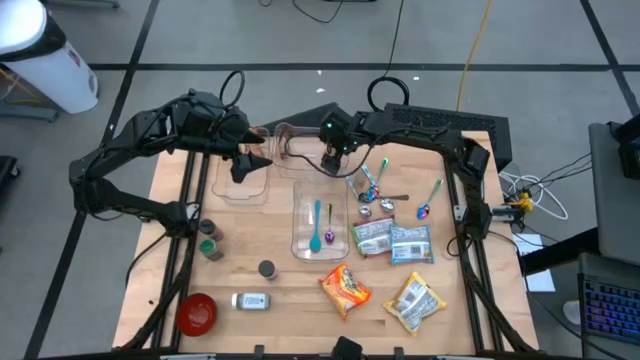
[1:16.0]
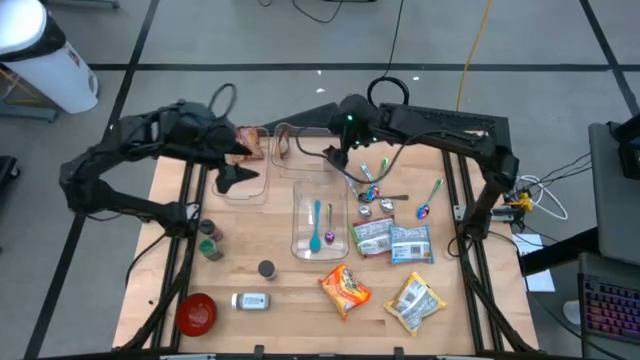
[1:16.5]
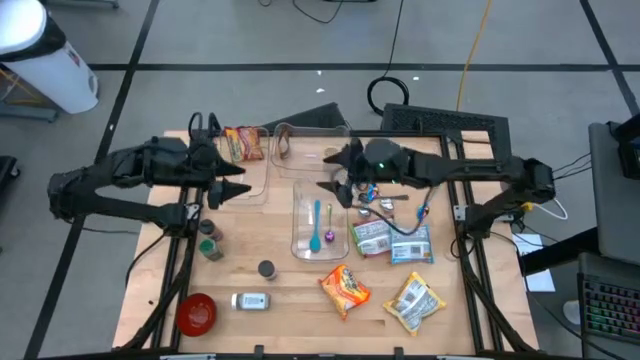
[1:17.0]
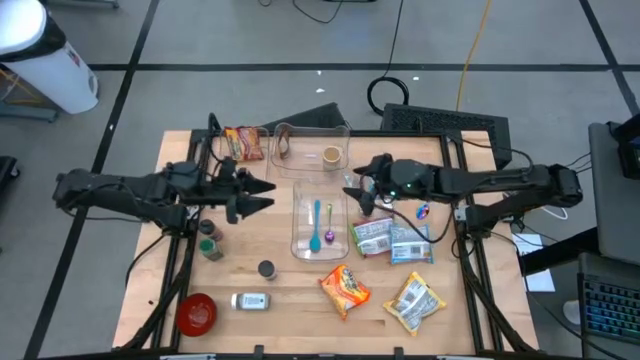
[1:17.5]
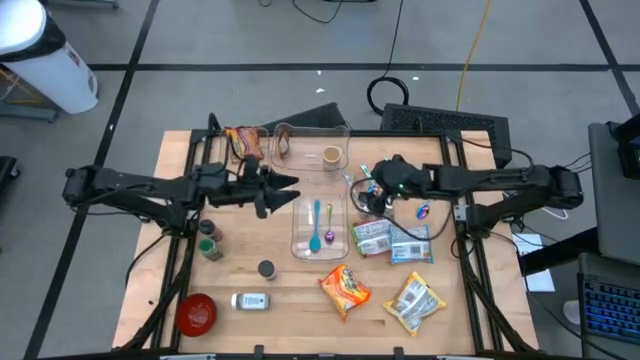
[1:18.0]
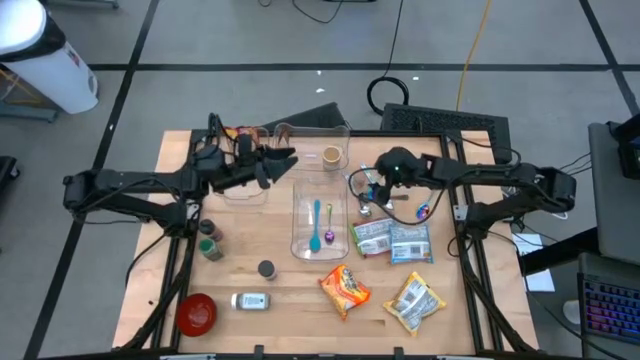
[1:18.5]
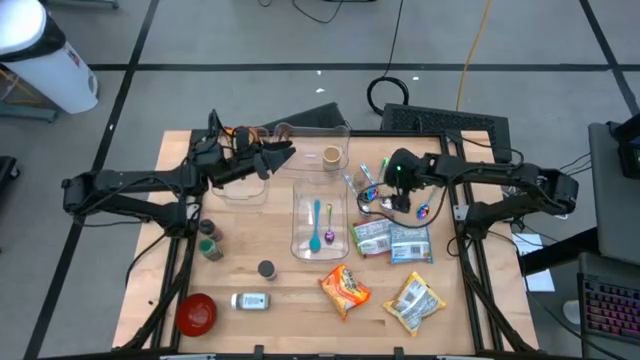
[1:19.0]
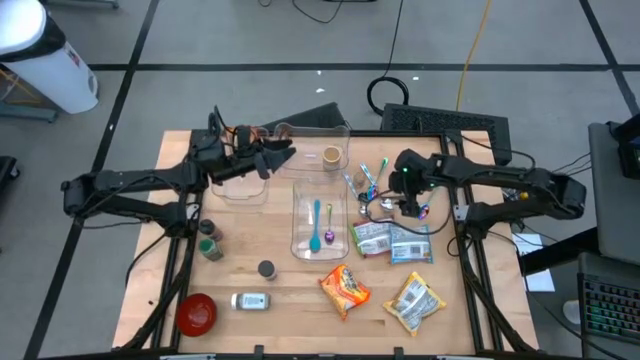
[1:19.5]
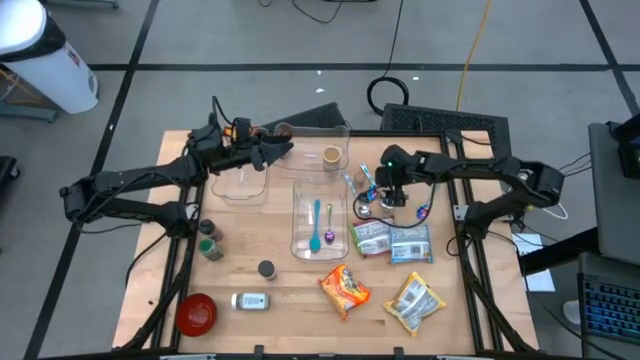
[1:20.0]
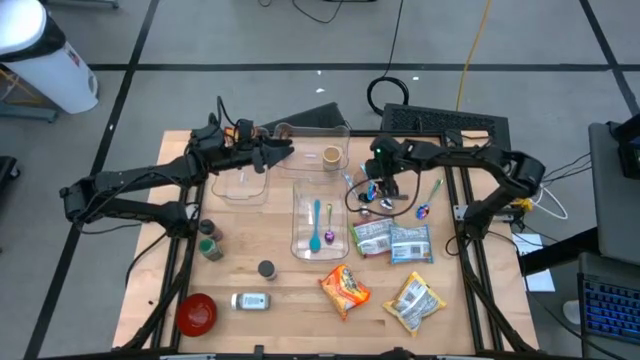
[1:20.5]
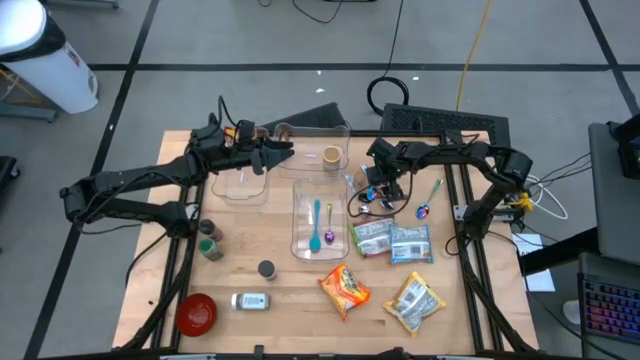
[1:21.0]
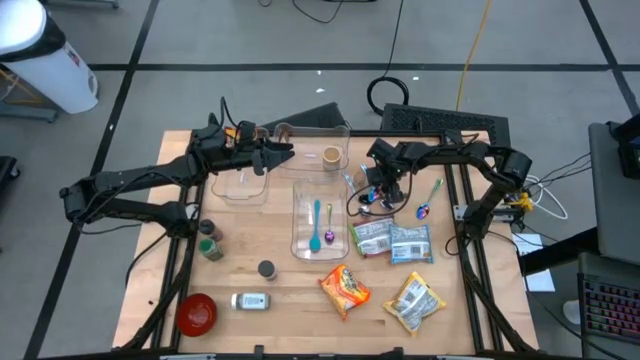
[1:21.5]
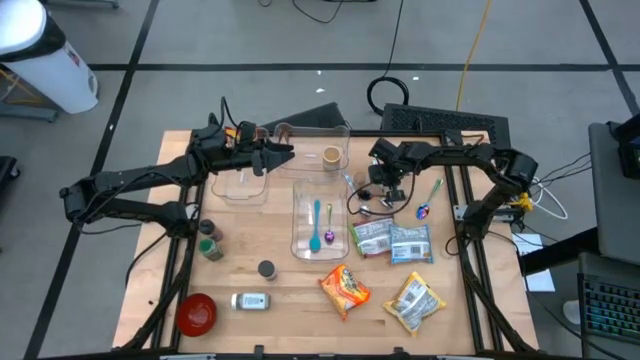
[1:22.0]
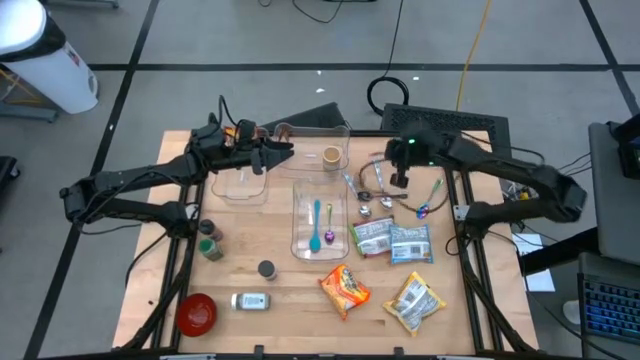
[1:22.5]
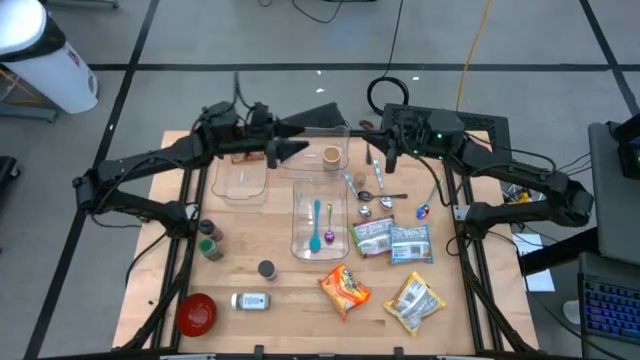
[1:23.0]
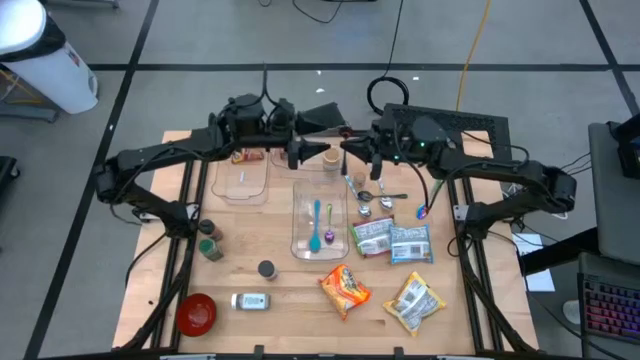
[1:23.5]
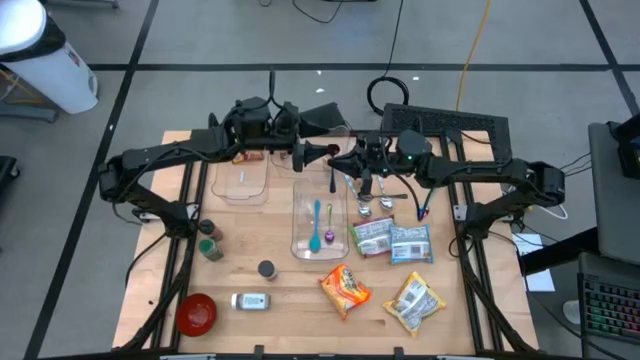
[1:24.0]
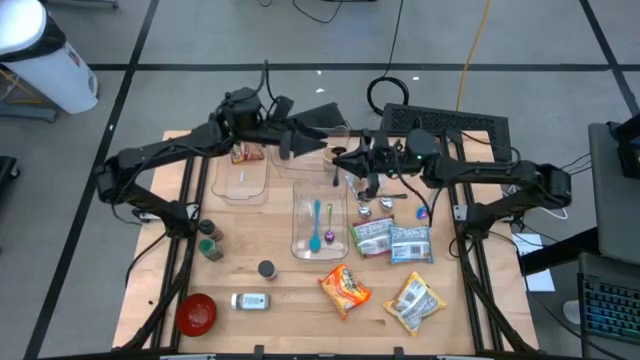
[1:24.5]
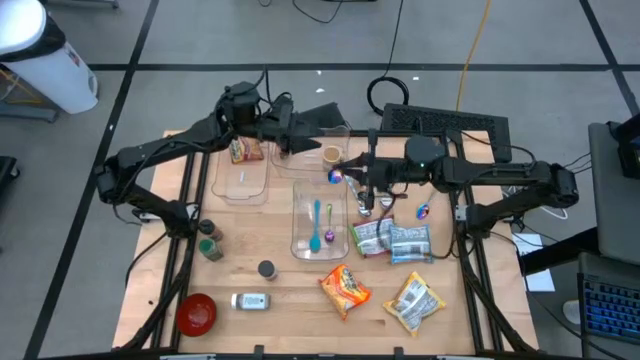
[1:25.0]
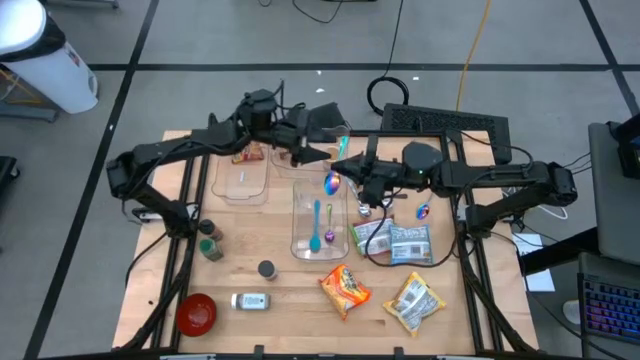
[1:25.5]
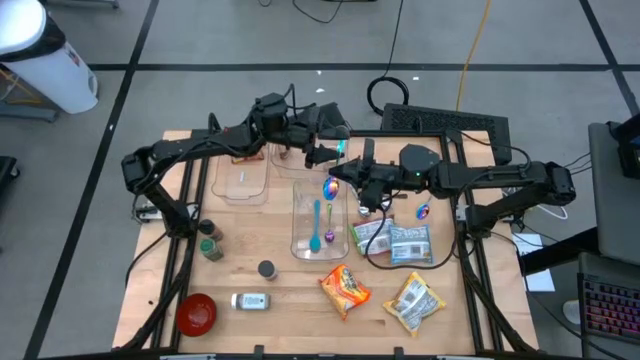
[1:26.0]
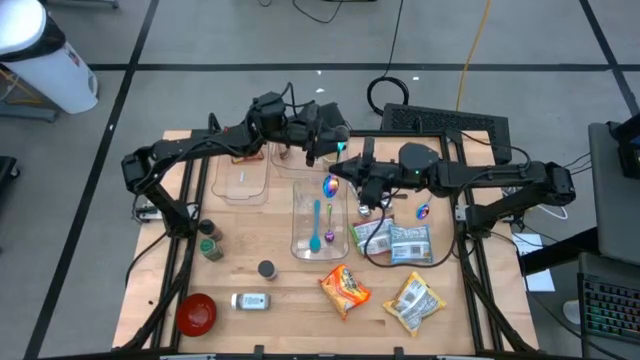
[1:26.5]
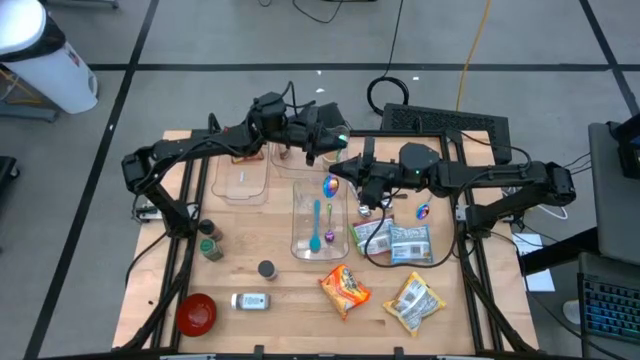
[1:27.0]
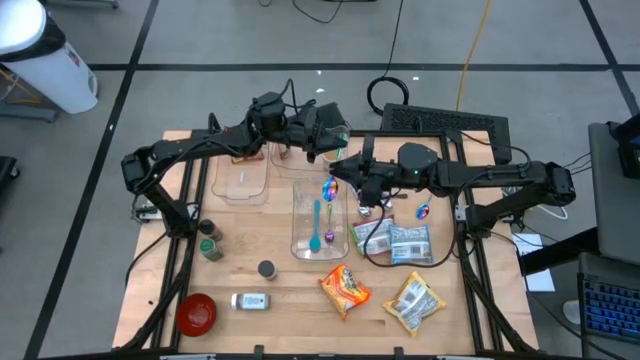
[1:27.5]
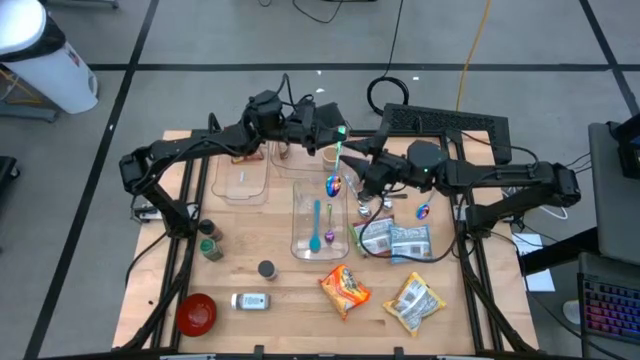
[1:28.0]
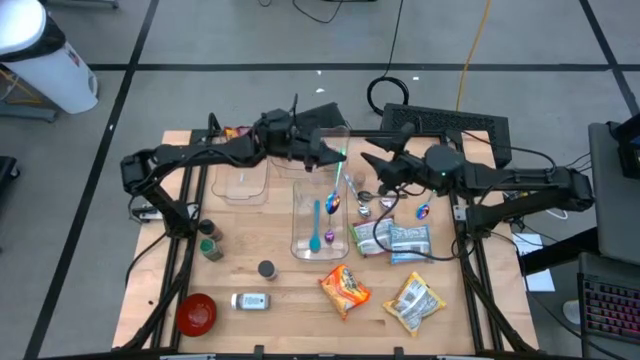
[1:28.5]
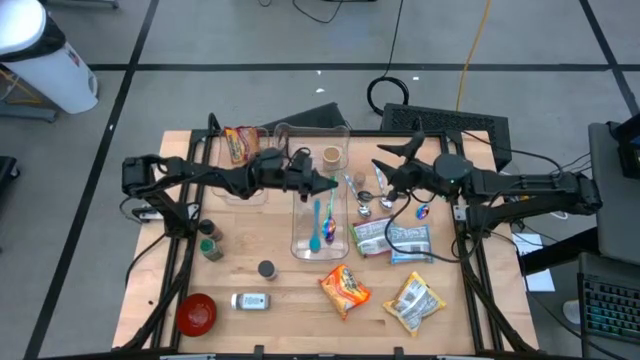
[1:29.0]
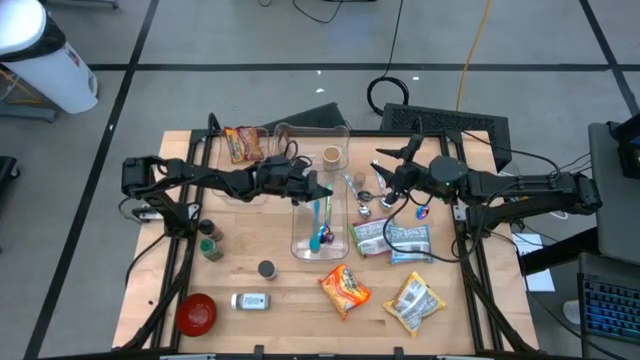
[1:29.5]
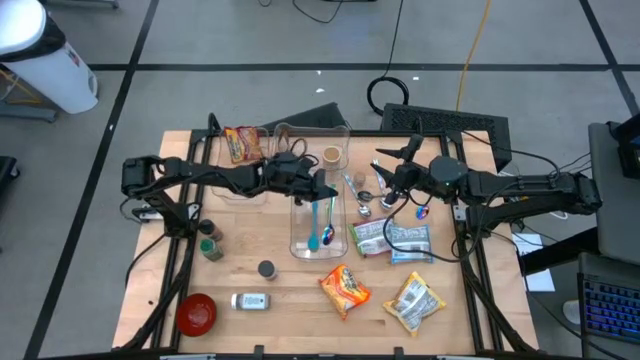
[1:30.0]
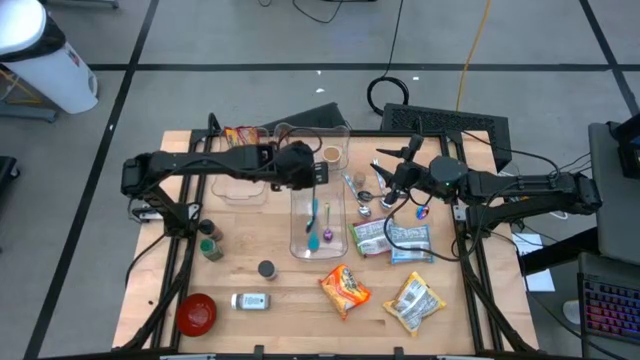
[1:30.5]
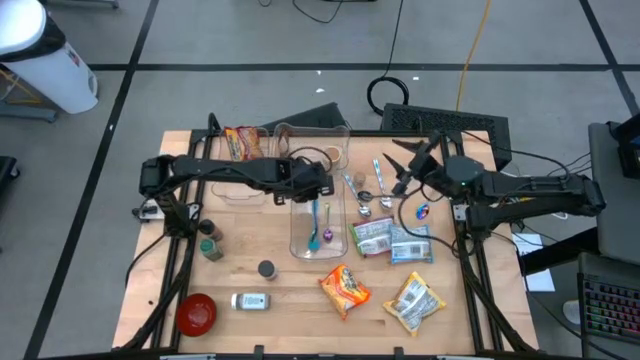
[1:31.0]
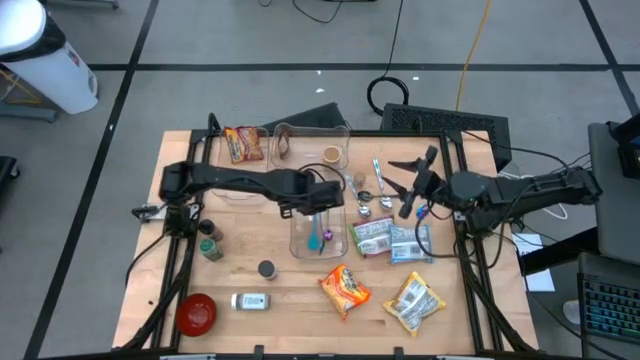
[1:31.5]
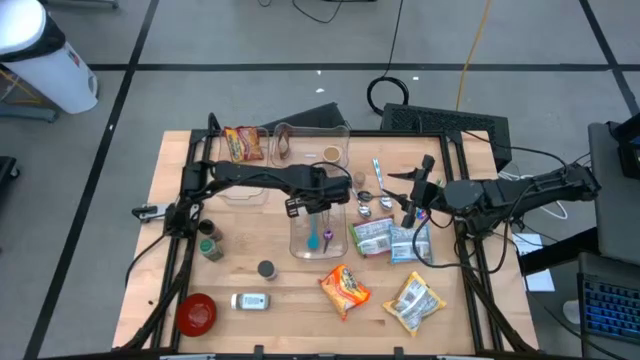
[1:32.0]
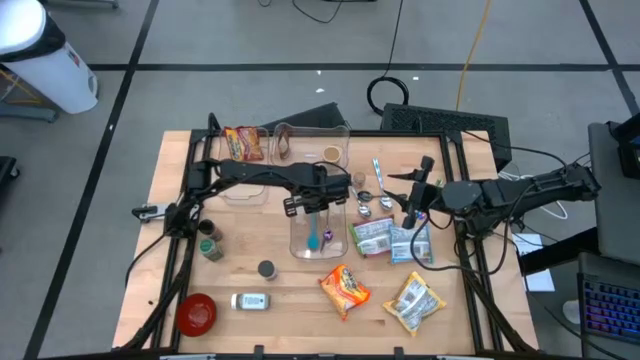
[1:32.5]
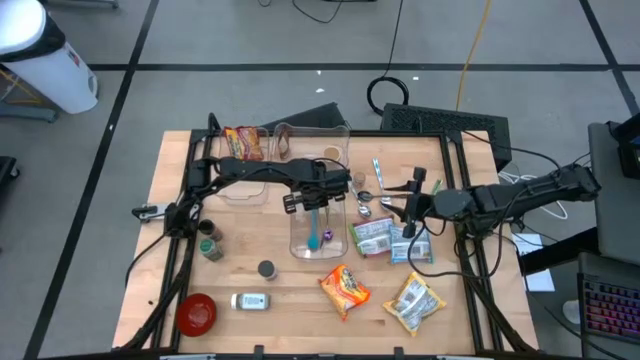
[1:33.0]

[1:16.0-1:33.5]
Task: Pick & Place Food Item
Put the left purple spoon into the bottom right transparent bin
